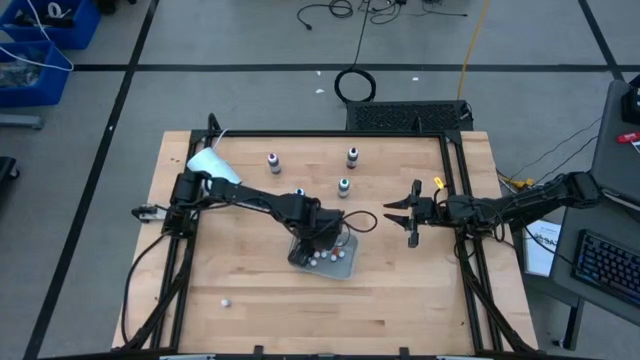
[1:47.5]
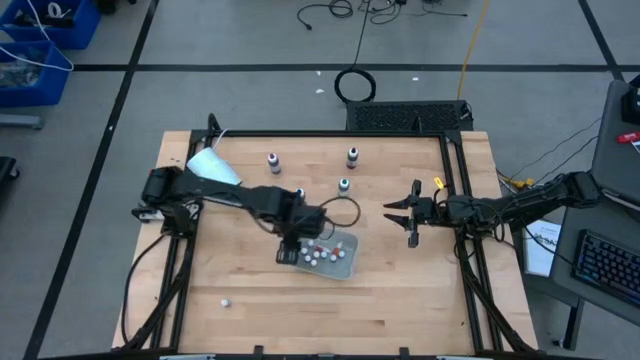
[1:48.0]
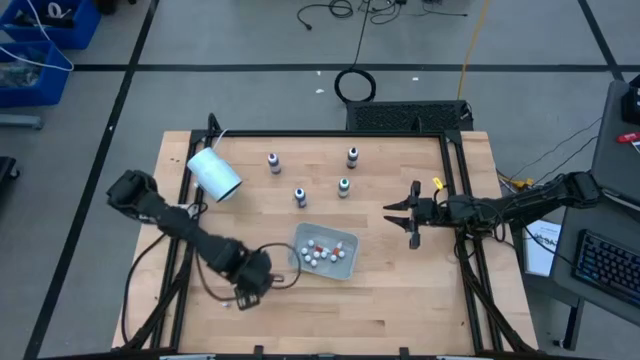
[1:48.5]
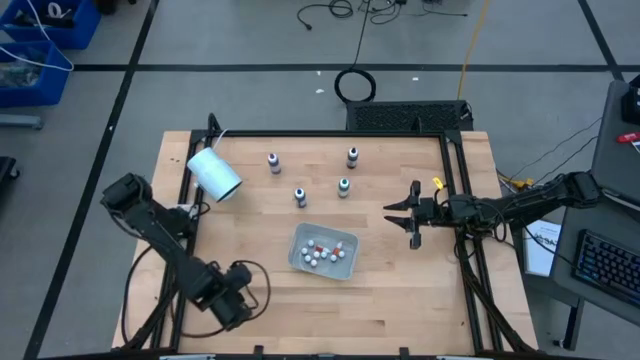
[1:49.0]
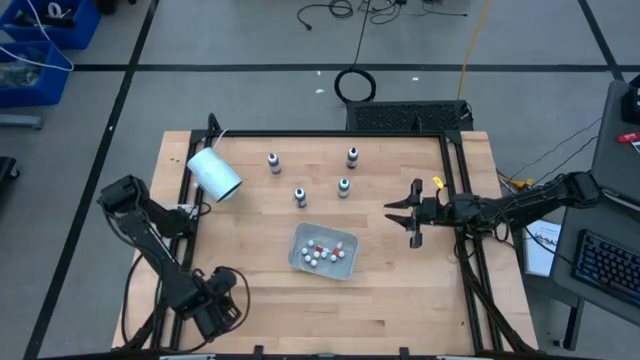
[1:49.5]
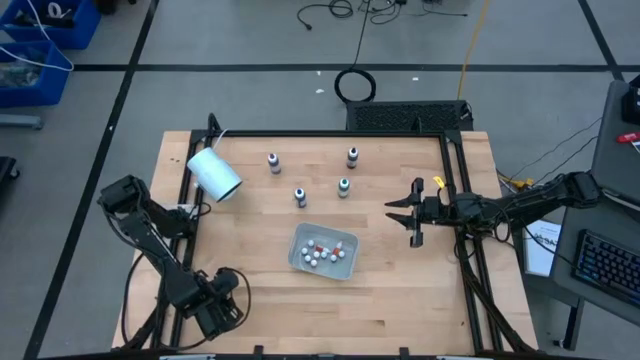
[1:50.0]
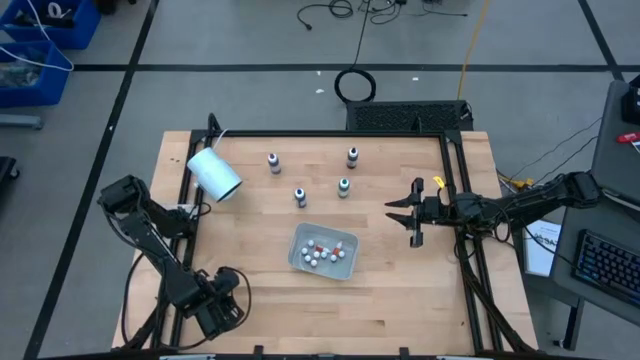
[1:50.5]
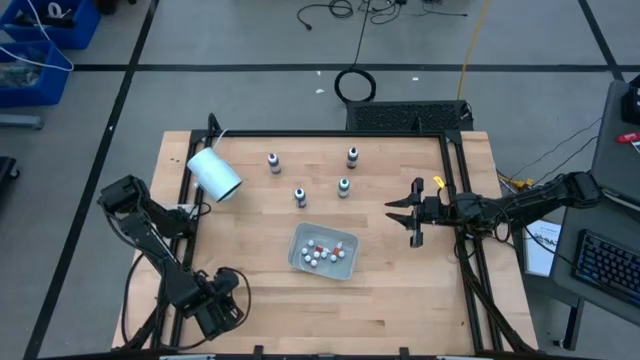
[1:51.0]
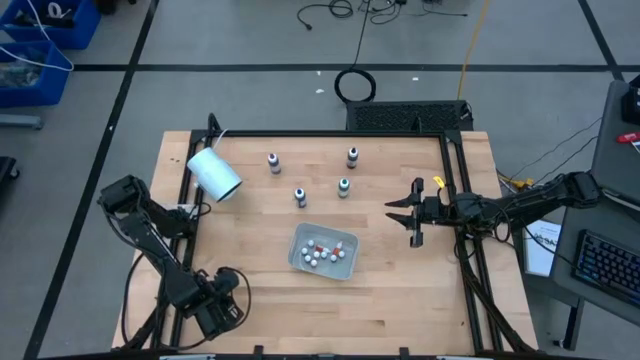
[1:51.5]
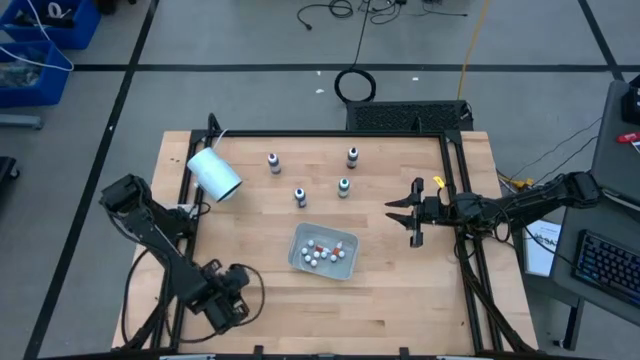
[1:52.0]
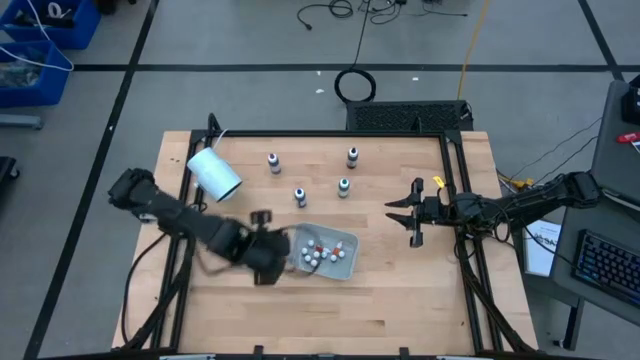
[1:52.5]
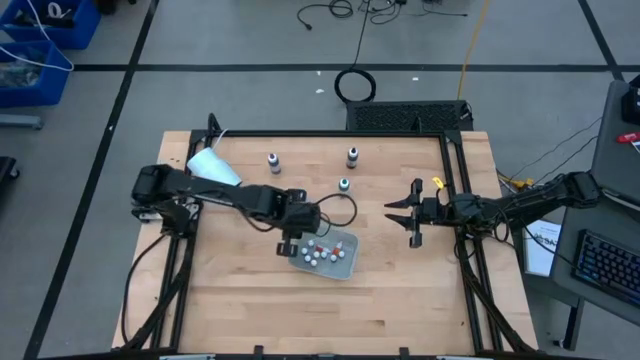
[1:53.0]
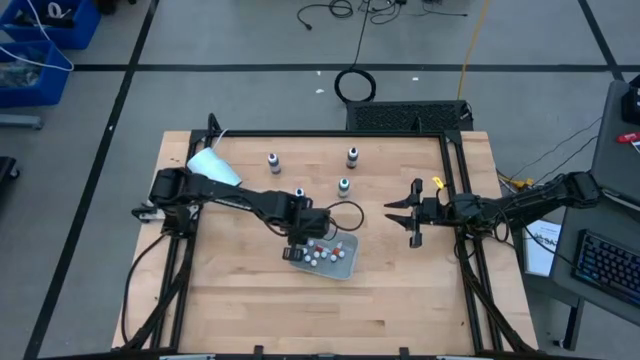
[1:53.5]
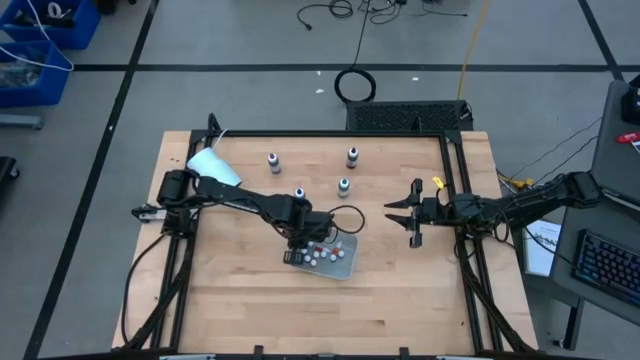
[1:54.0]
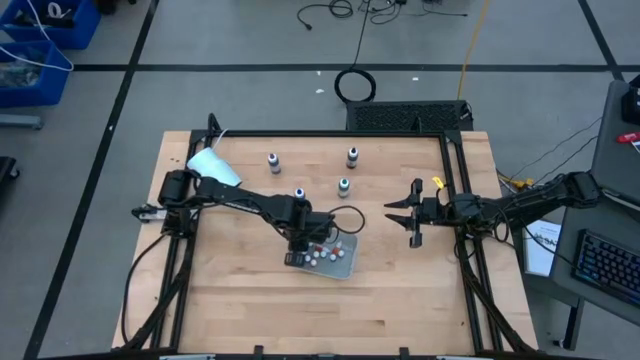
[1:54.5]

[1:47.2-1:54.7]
Task: Pick & Place food coloring
Put the black food coloring bottle into the bin

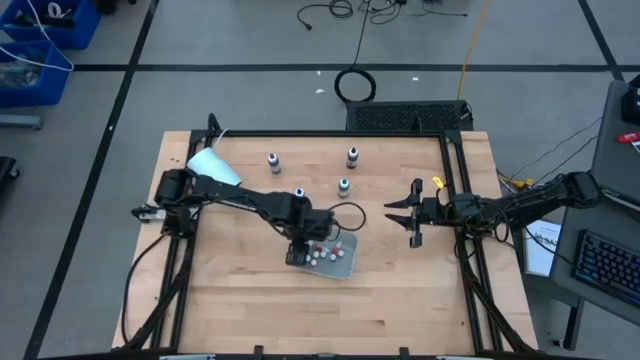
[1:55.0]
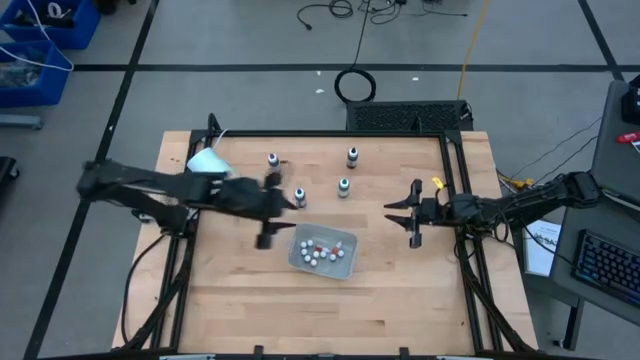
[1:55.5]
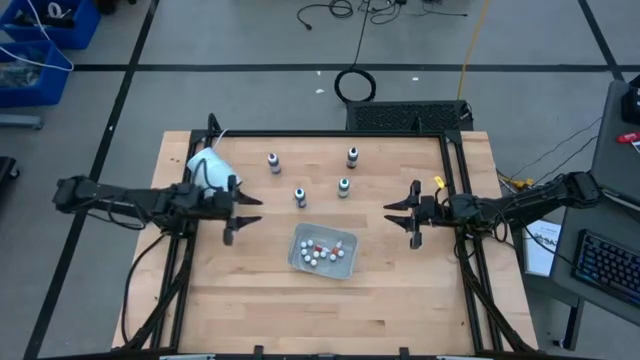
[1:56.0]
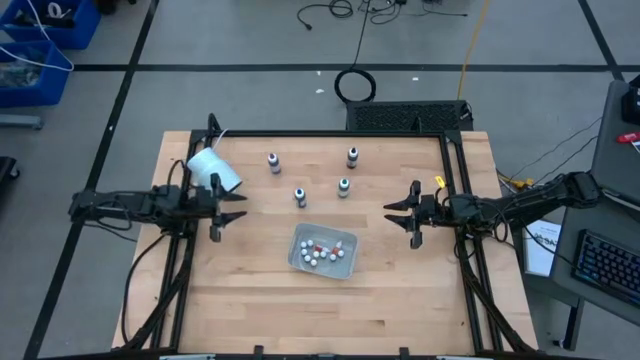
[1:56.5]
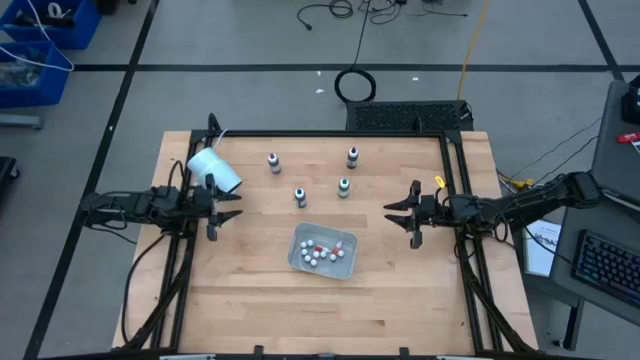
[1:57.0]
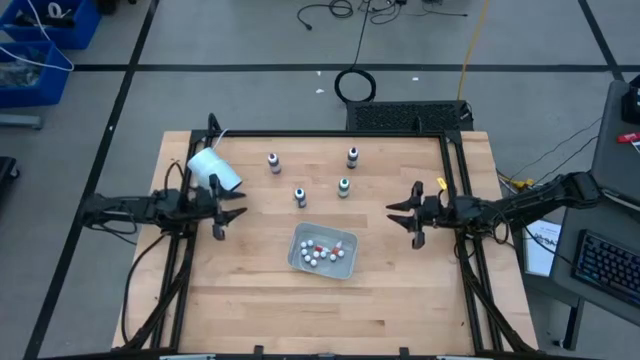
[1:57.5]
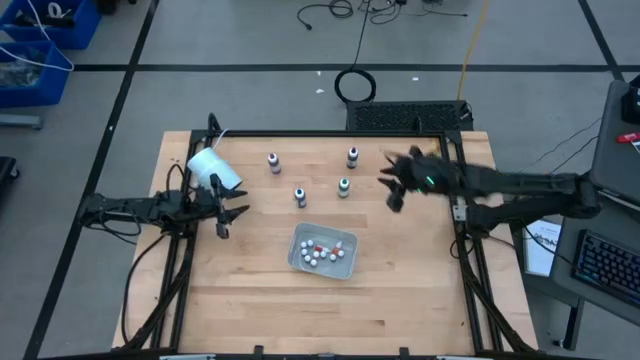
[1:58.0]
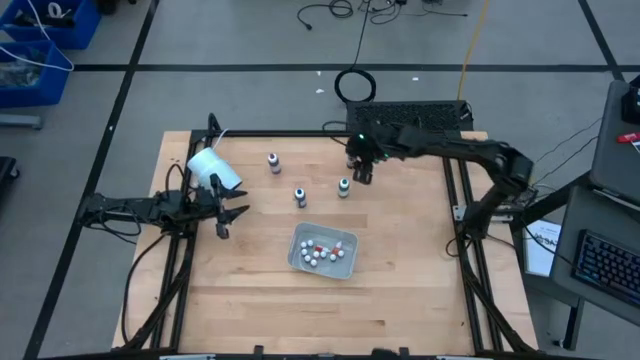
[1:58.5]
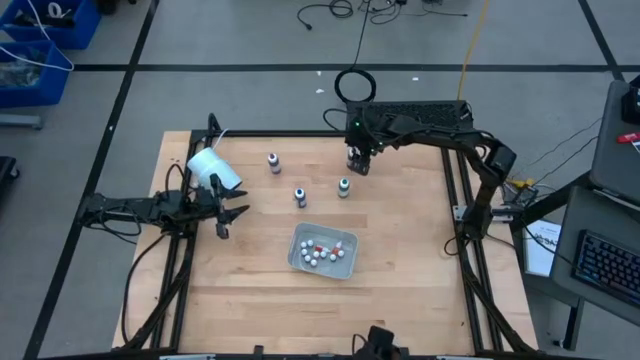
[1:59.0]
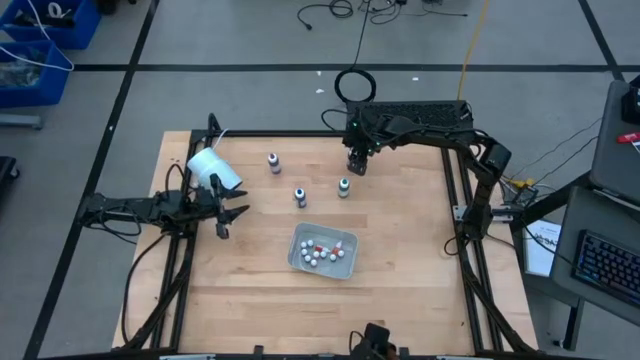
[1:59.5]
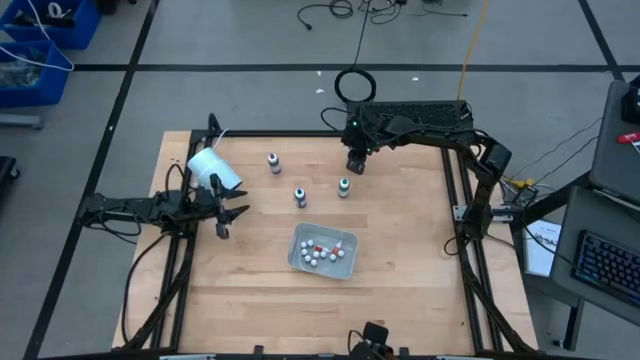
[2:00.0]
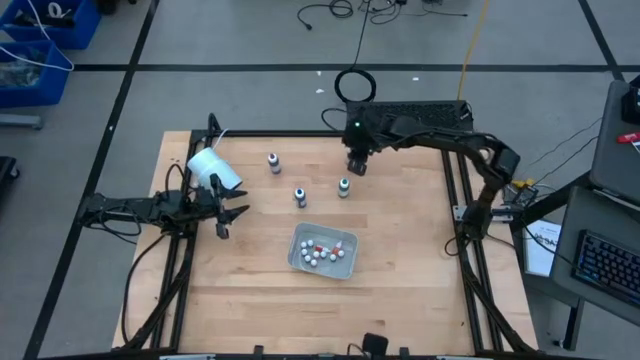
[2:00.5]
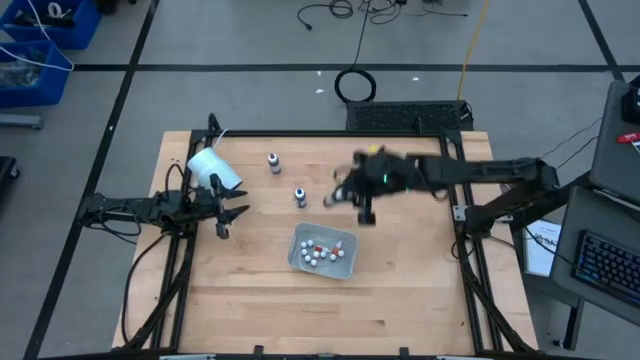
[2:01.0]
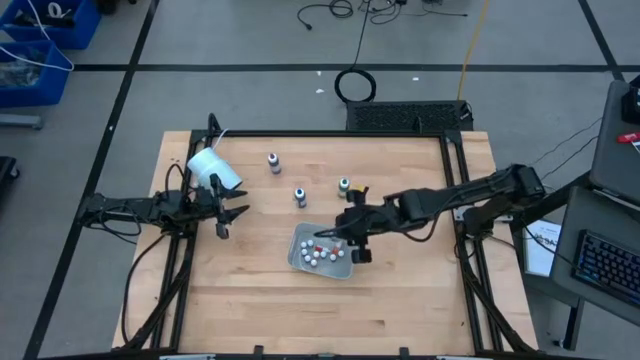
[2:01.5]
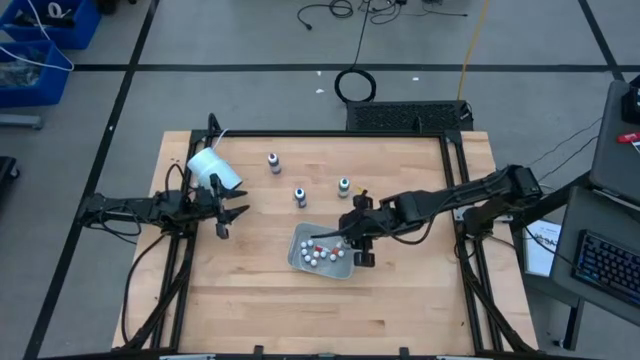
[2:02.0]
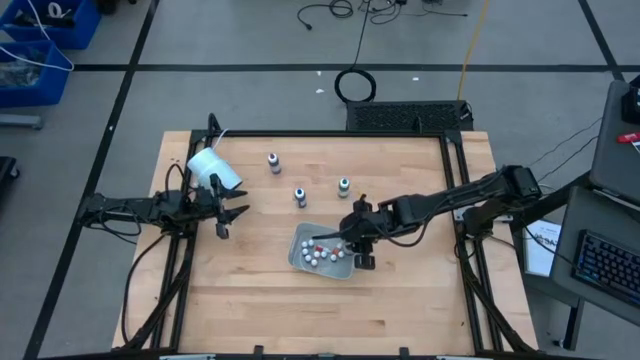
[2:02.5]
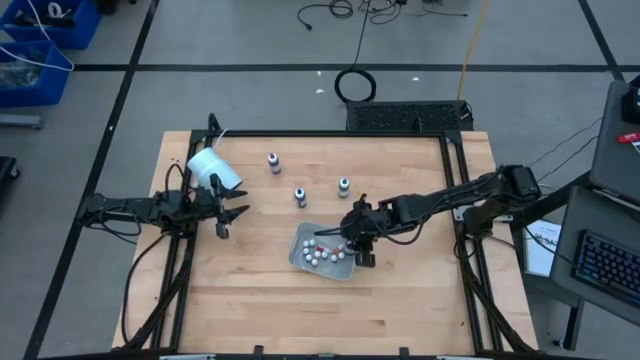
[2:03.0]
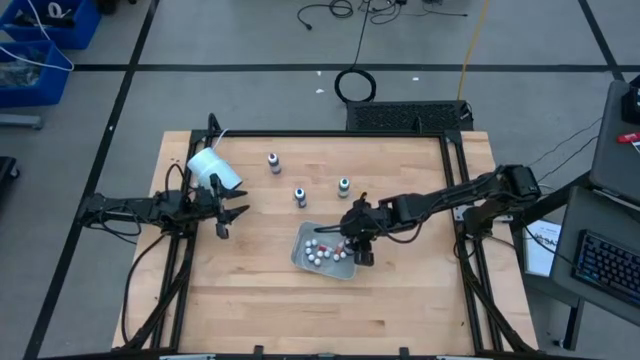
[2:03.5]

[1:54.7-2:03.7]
Put the black food coloring bottle into the bin

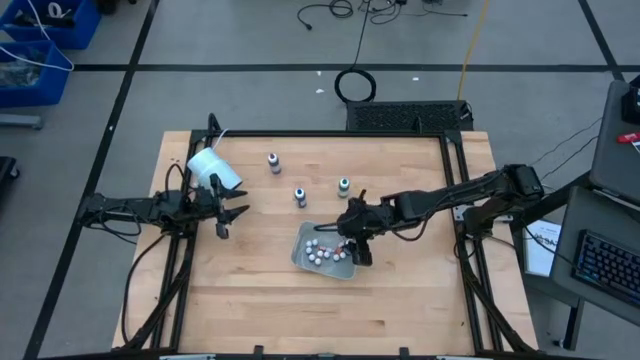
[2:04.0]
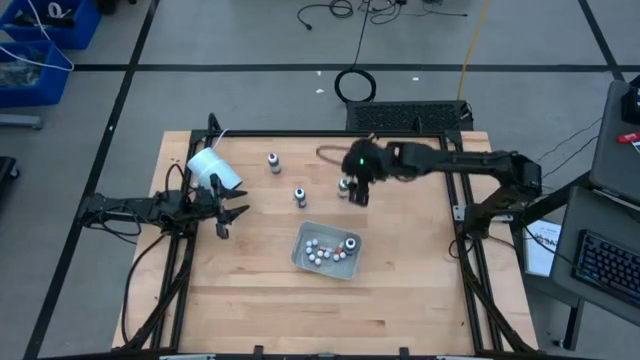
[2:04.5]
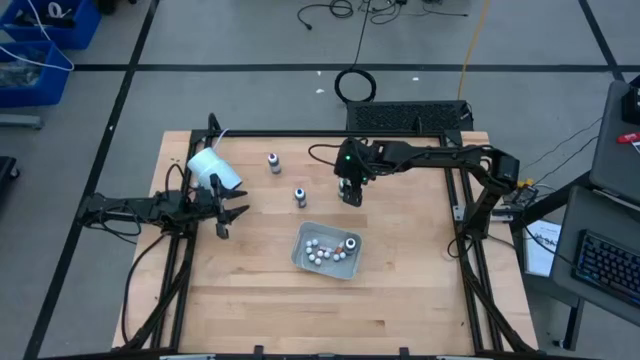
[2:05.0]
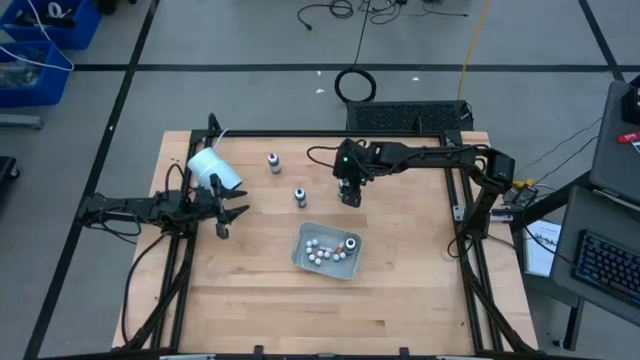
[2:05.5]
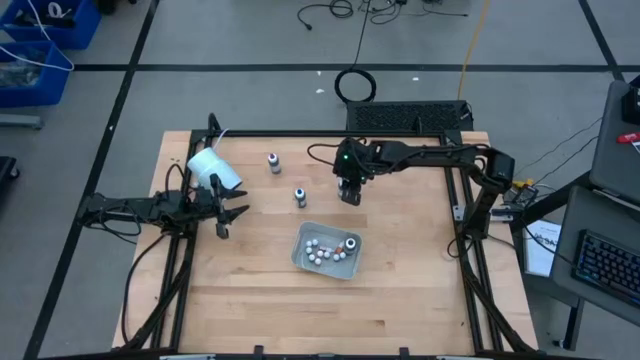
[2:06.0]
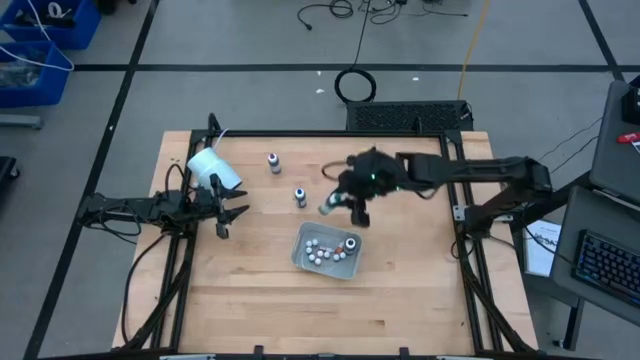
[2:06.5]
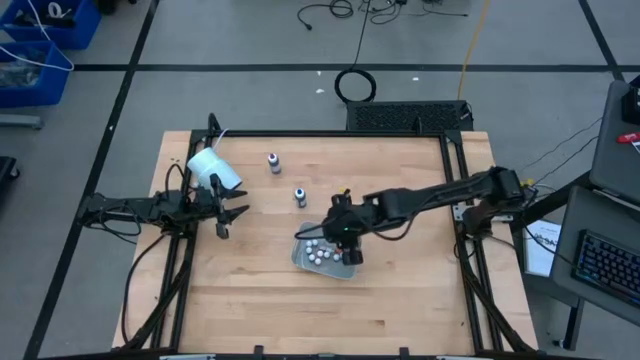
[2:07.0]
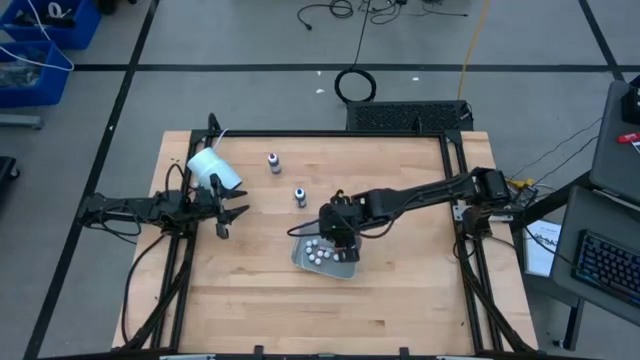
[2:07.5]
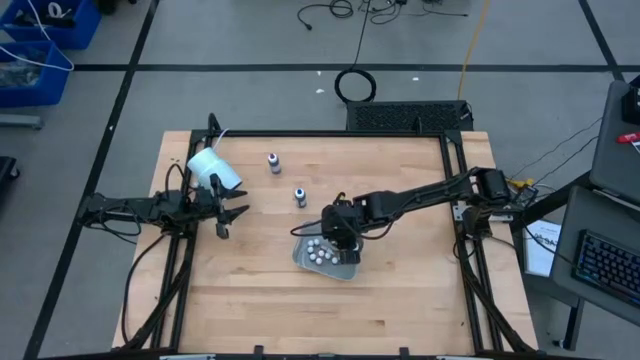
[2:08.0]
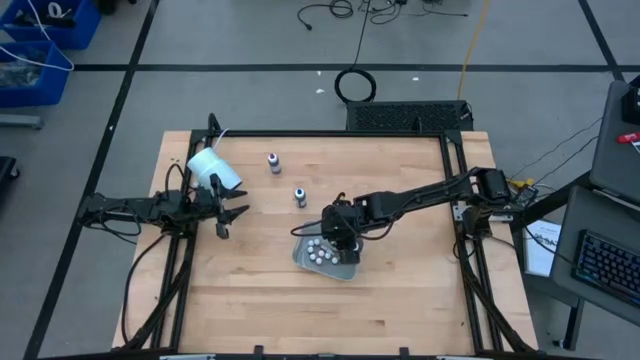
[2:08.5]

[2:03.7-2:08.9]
Put the green food coloring bottle into the bin
